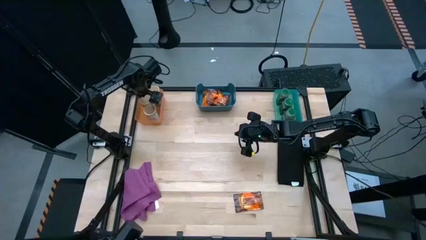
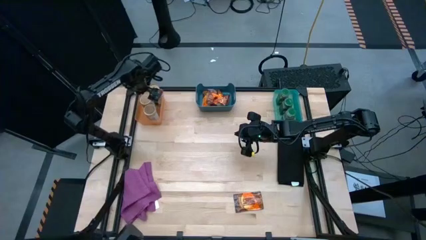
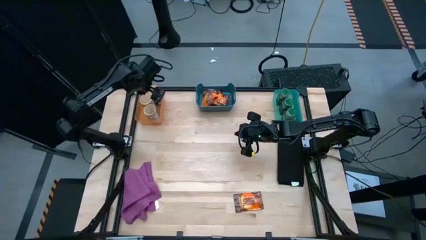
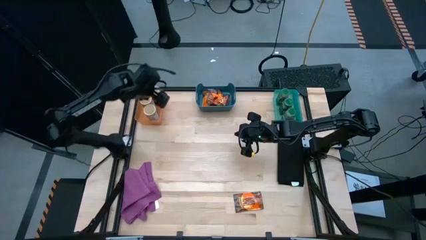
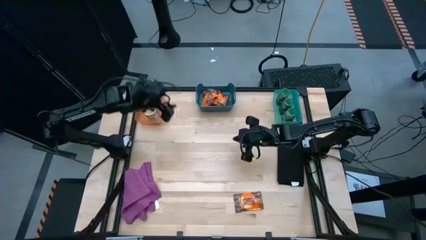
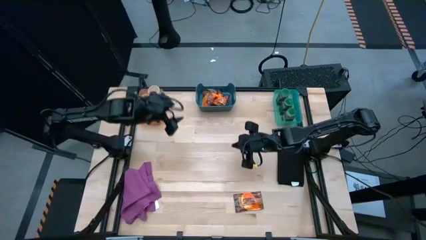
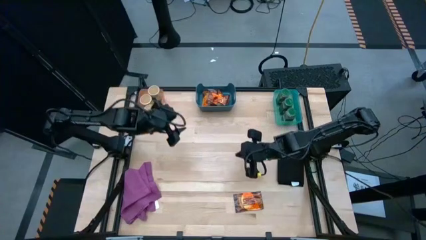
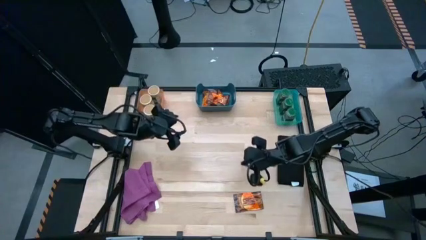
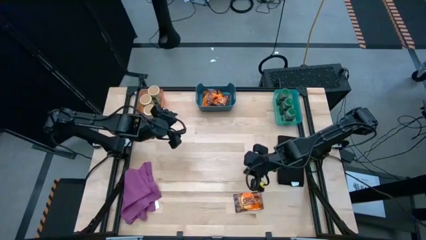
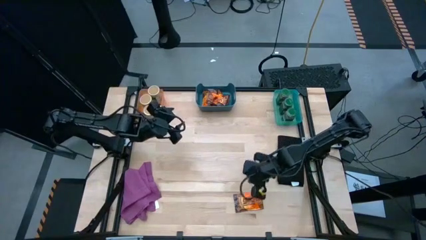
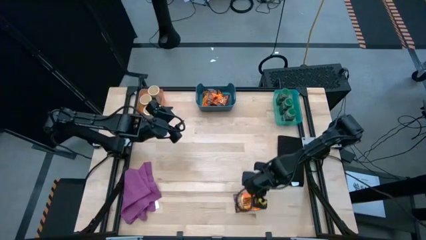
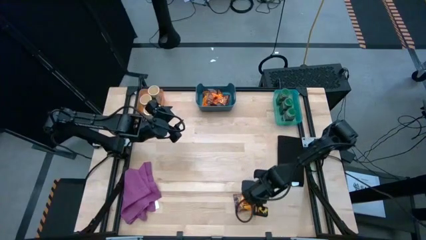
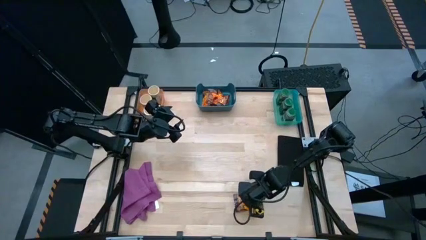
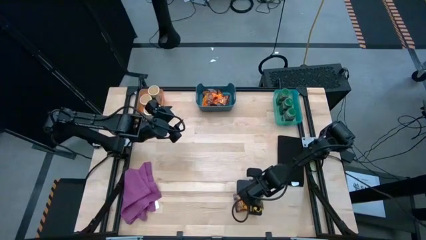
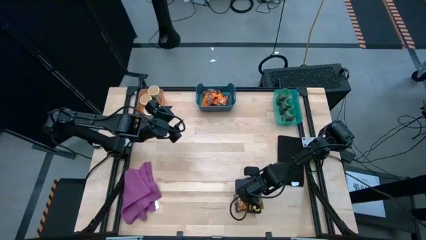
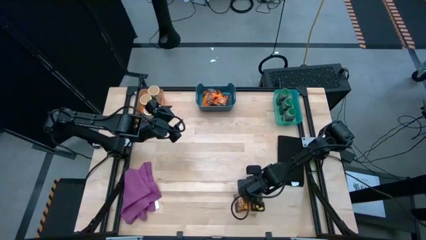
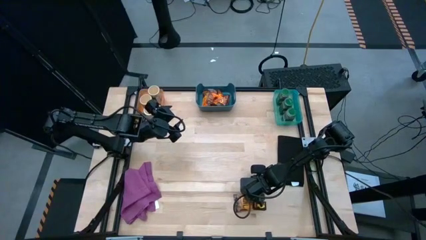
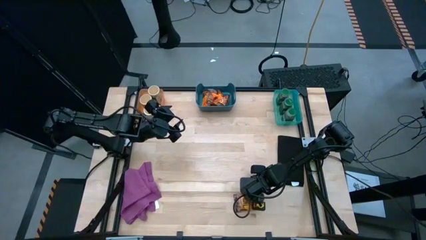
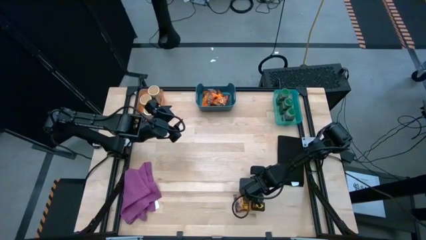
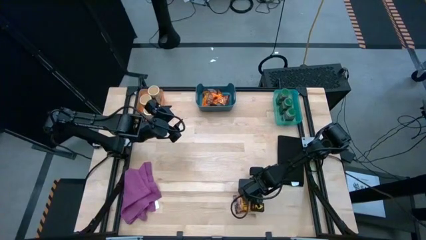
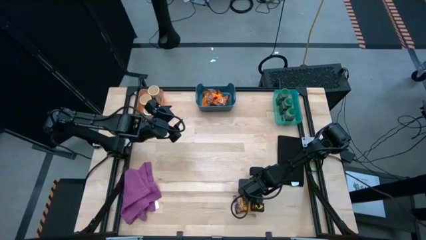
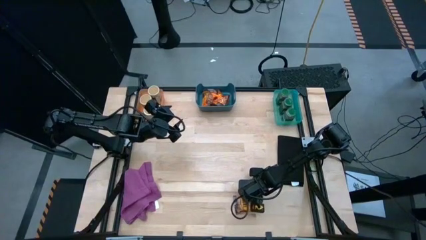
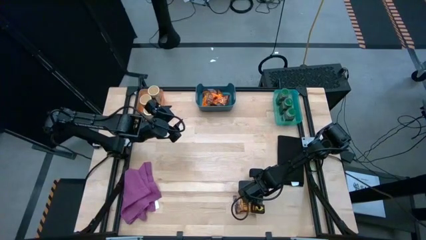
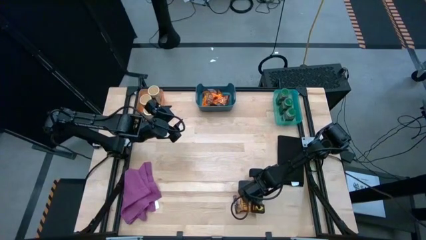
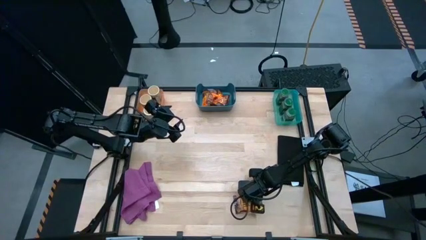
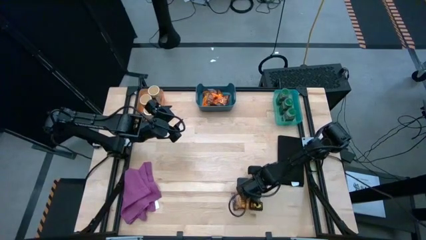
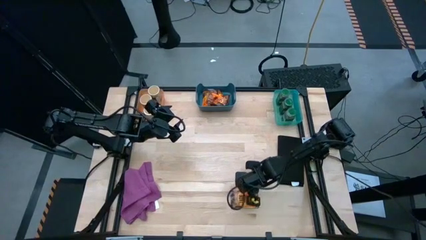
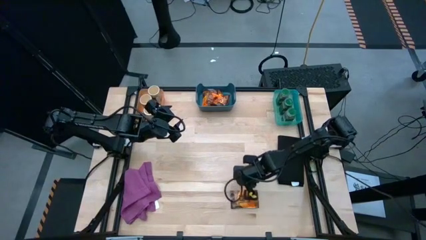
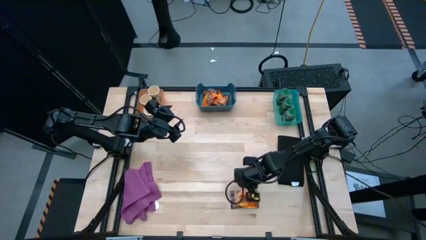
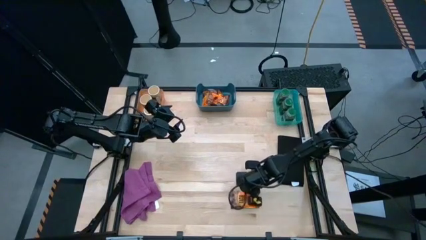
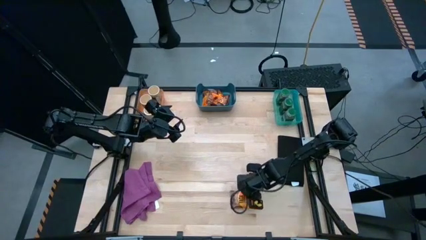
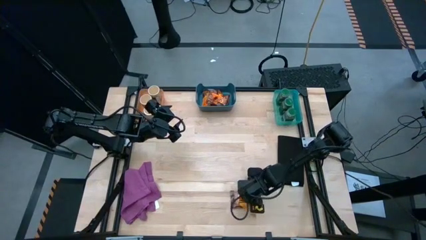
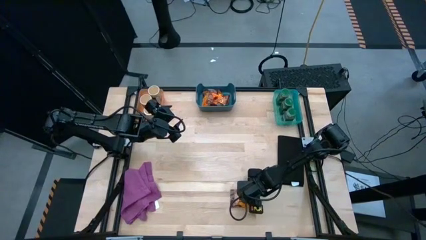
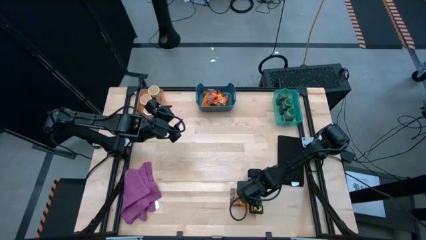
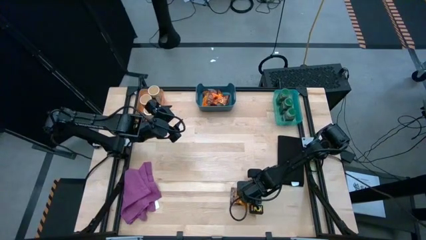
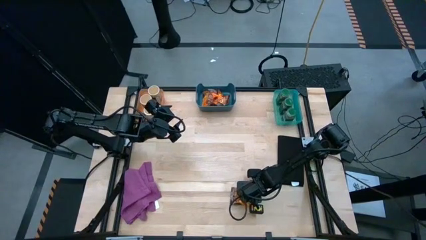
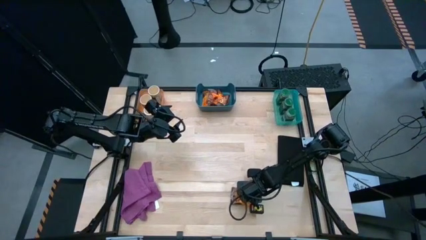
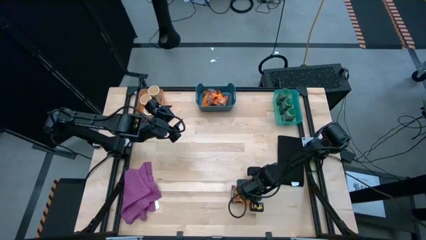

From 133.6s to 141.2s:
Task: Sort spices by type
Put the orange seasoning into the dark blue bin

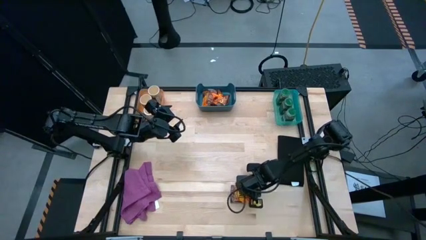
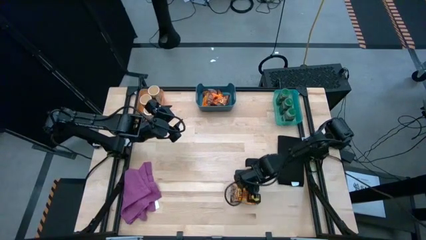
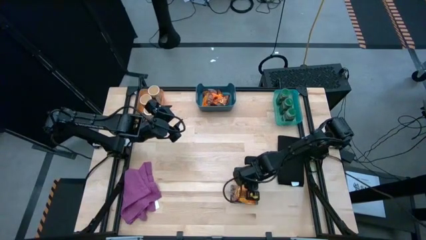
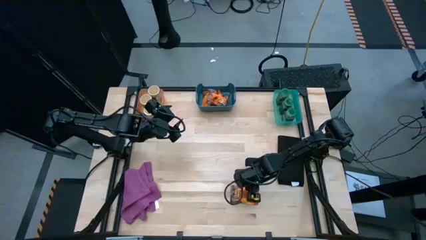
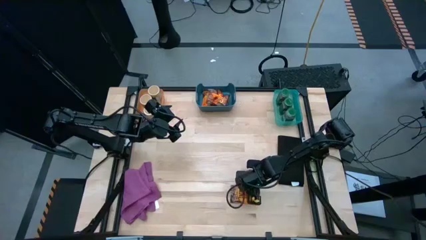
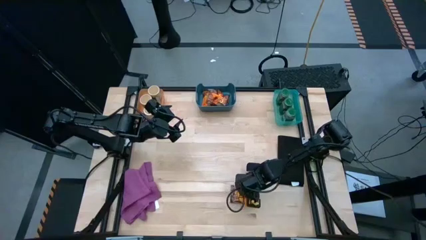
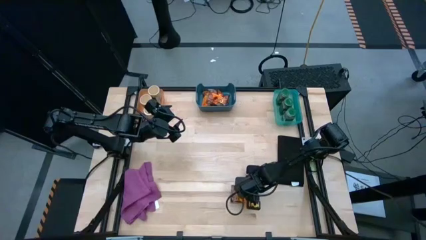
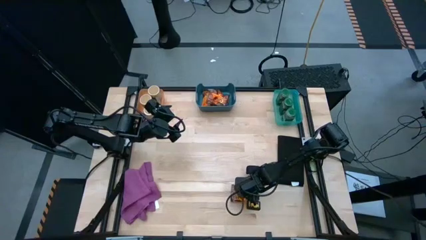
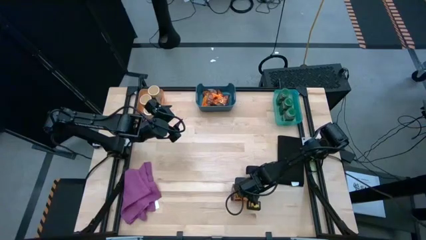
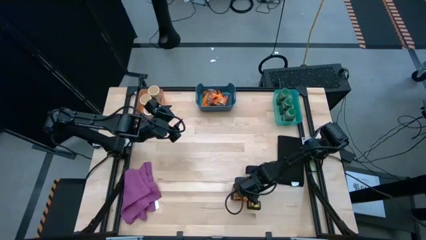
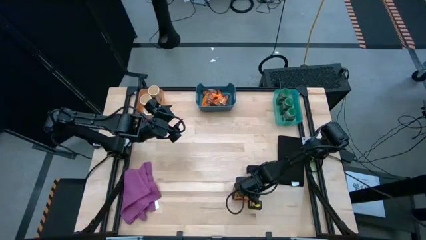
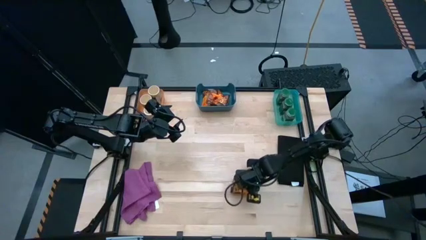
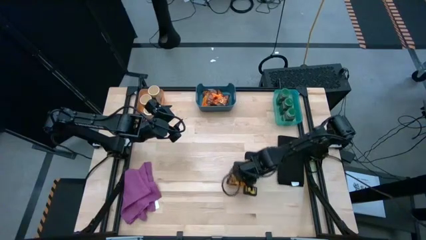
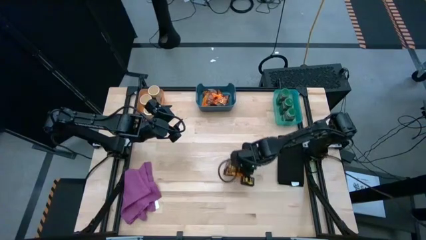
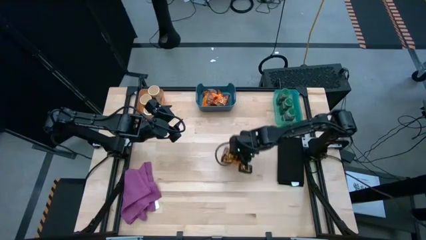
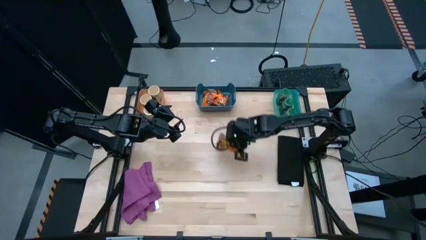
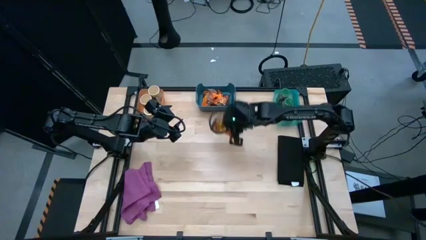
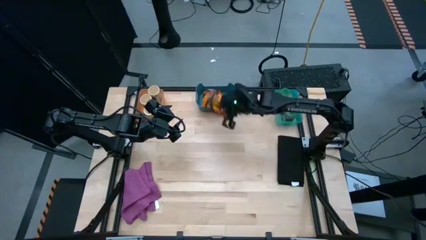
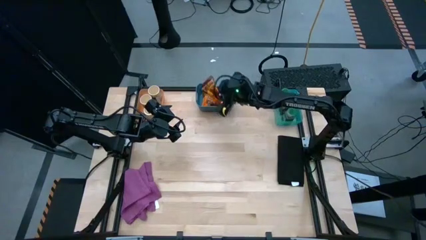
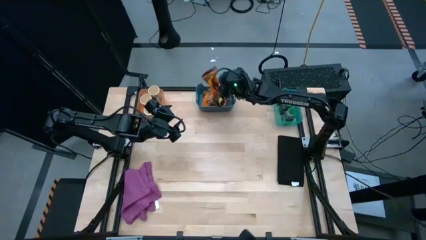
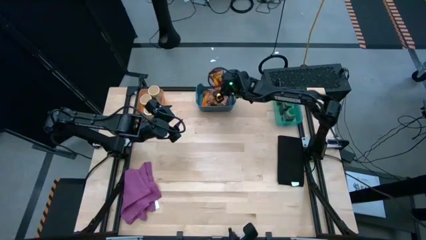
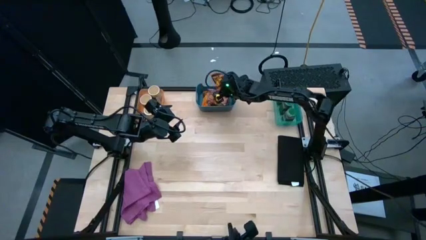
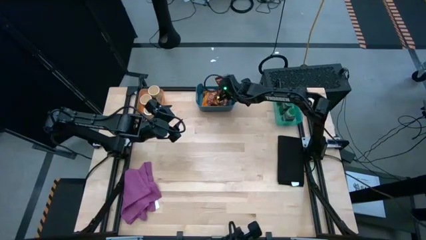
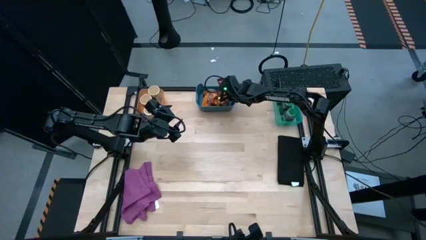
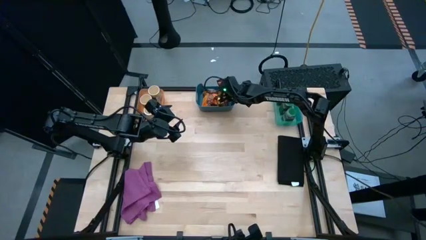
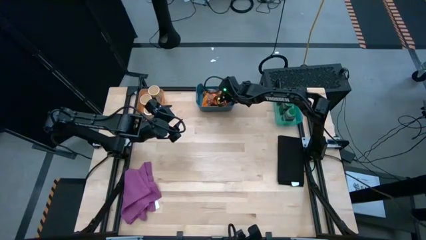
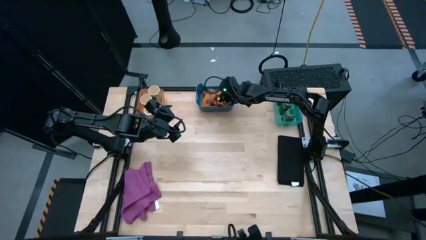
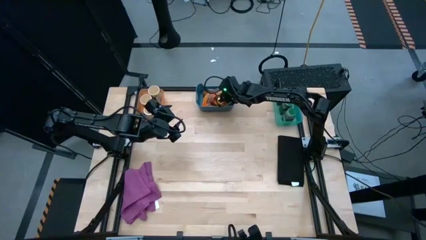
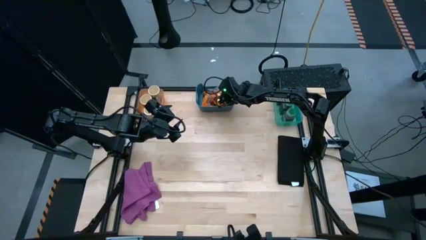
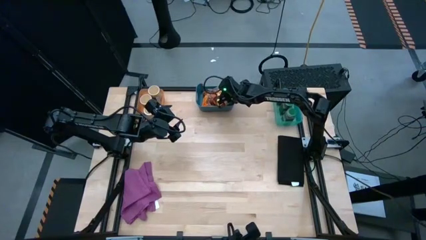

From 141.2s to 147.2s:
Put the orange seasoning into the dark blue bin

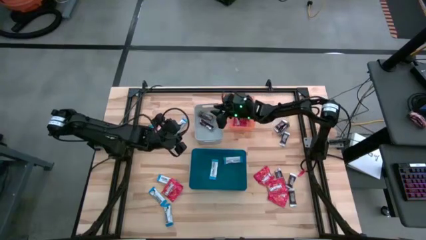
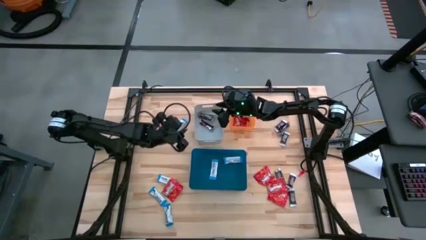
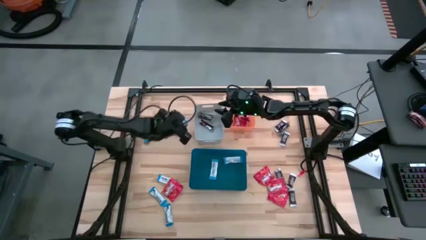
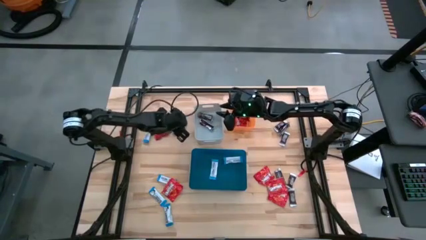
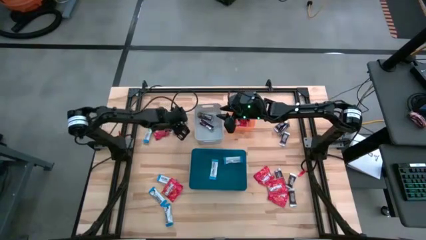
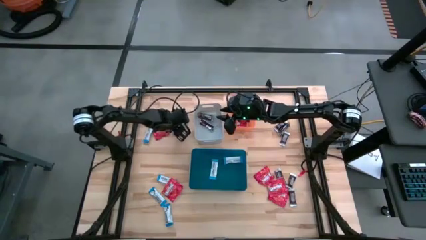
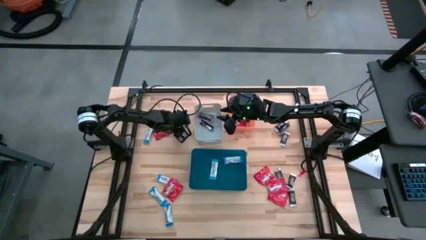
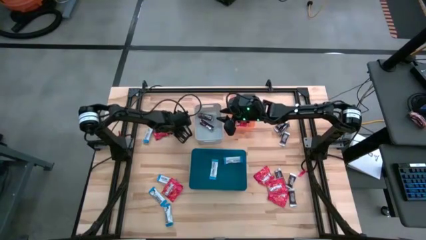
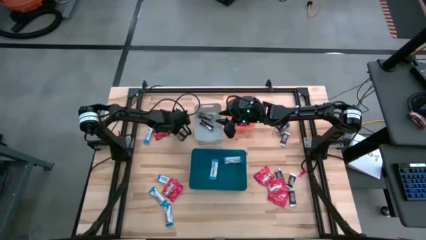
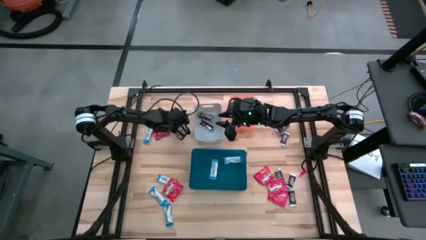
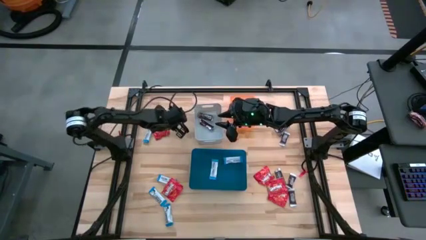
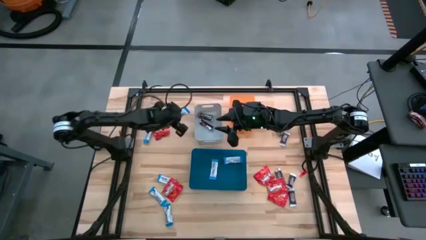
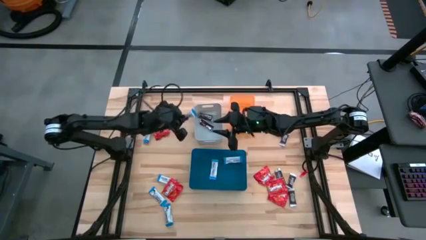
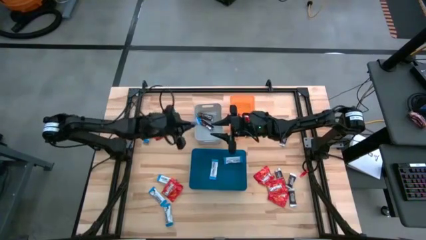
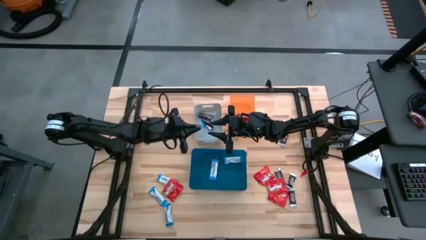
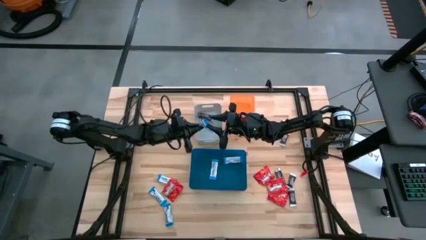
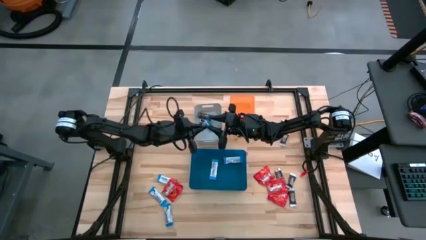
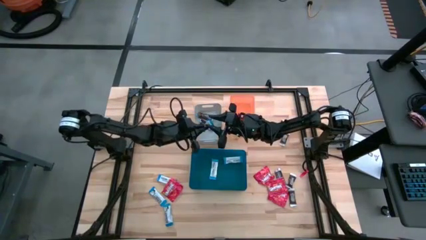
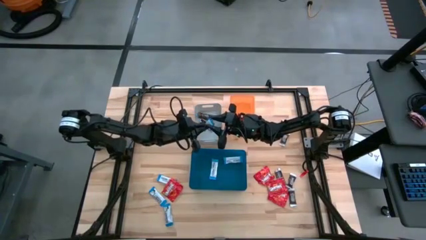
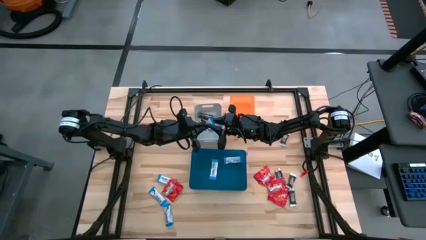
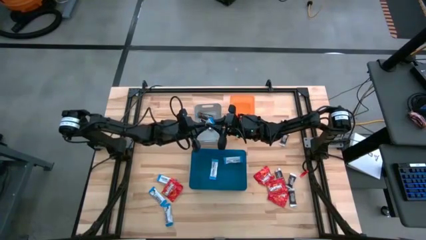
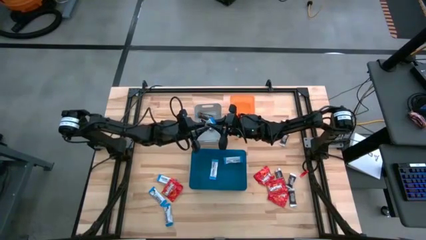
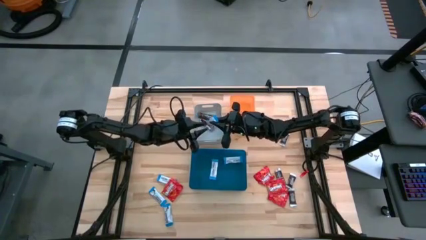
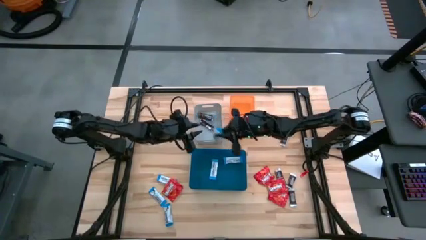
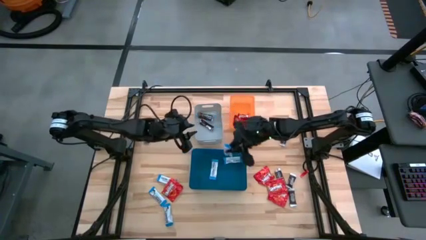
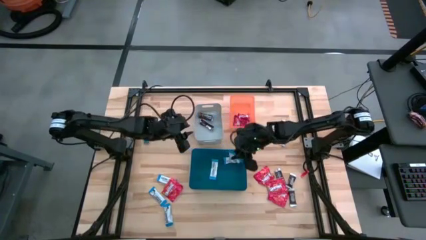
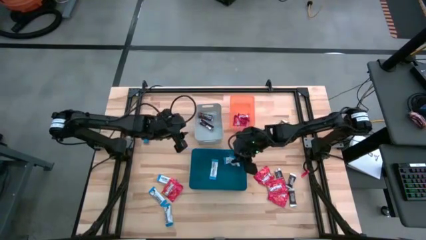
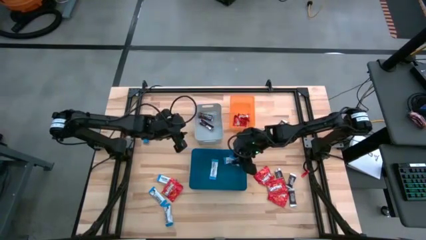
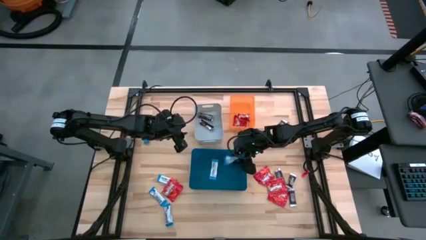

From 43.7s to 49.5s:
Task: Sort candy
Put the white chocolate bar into the blue bin
